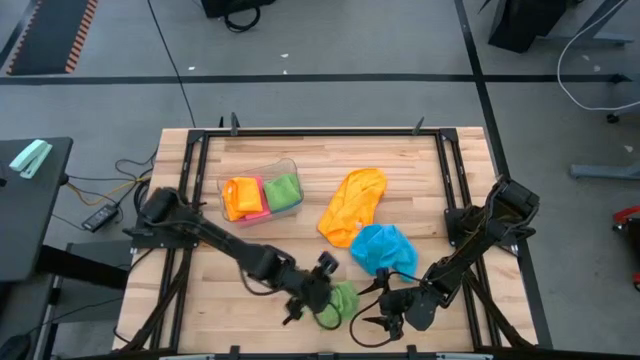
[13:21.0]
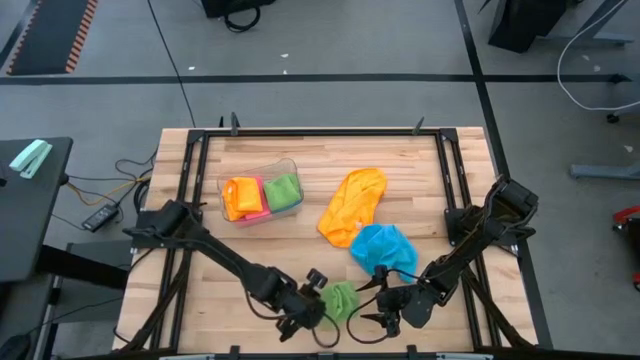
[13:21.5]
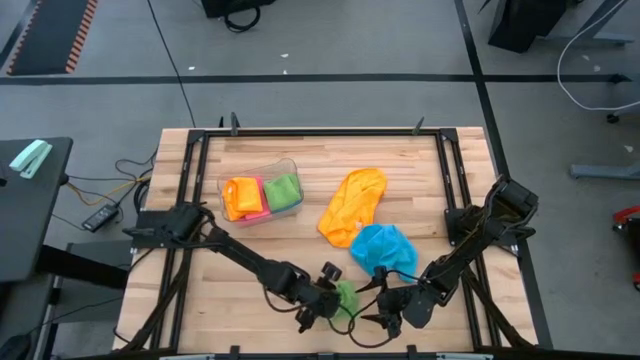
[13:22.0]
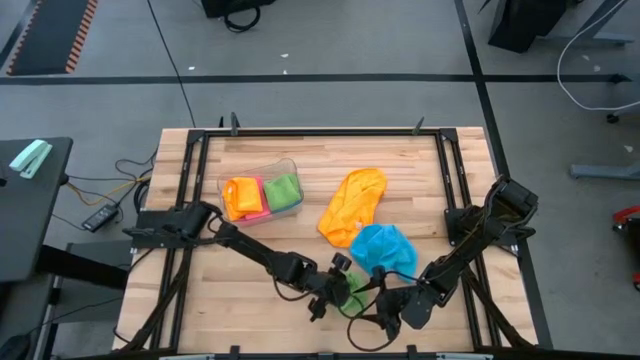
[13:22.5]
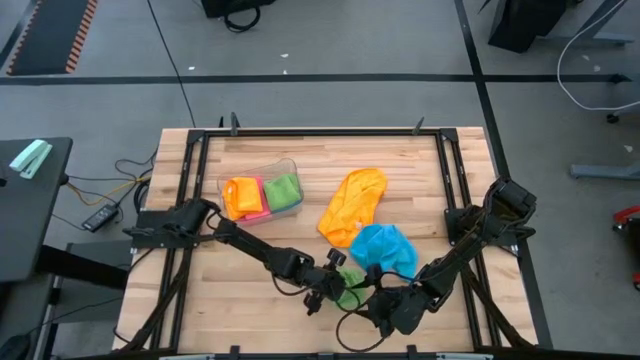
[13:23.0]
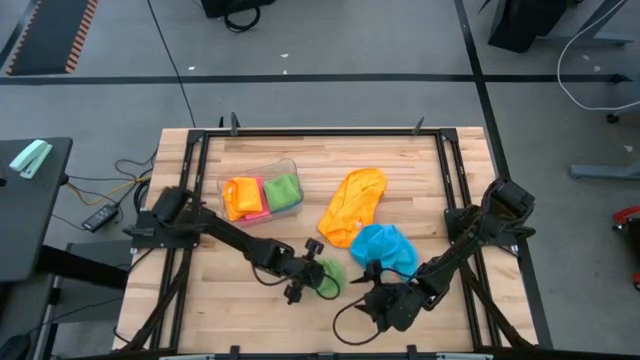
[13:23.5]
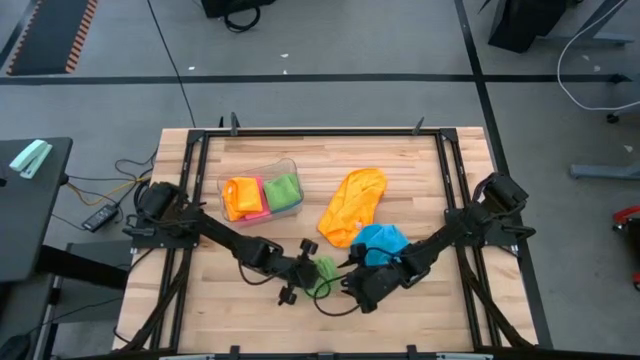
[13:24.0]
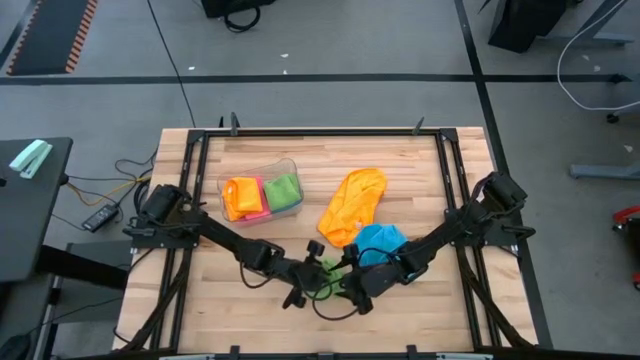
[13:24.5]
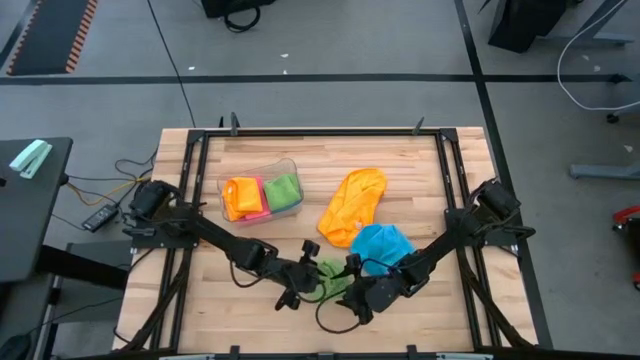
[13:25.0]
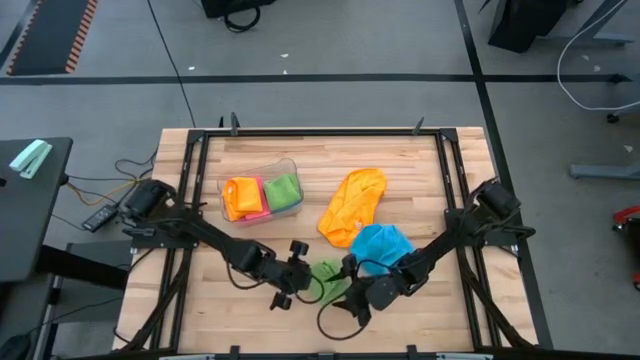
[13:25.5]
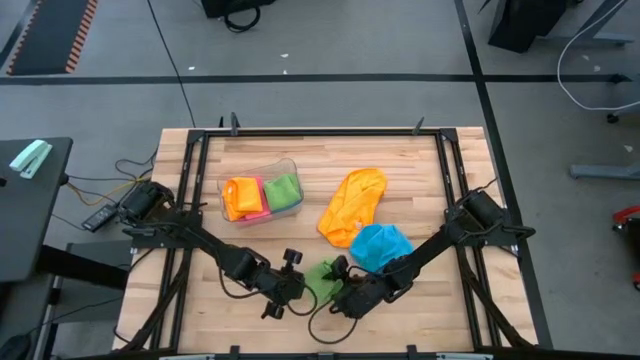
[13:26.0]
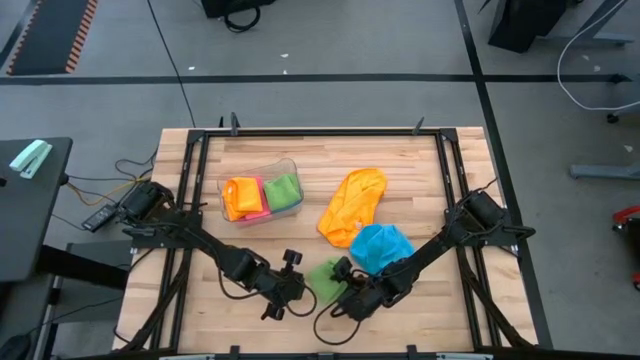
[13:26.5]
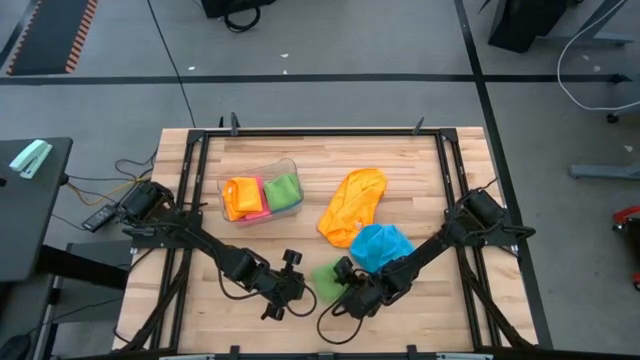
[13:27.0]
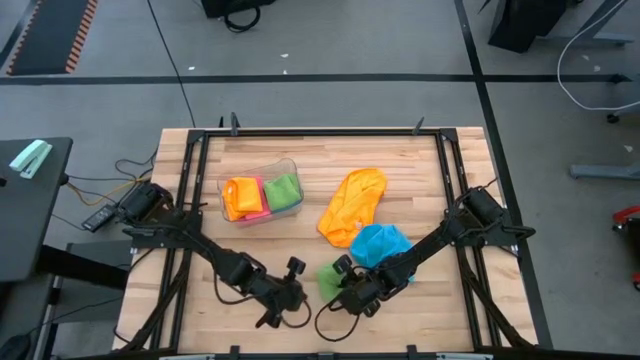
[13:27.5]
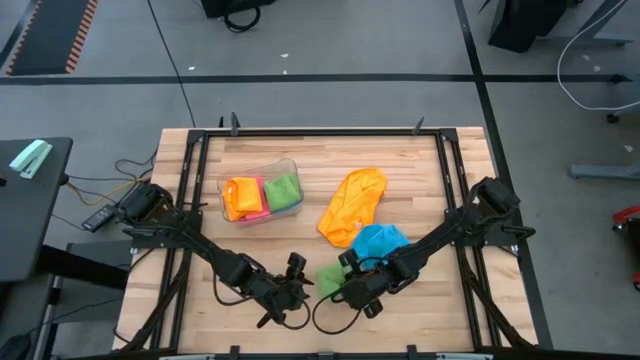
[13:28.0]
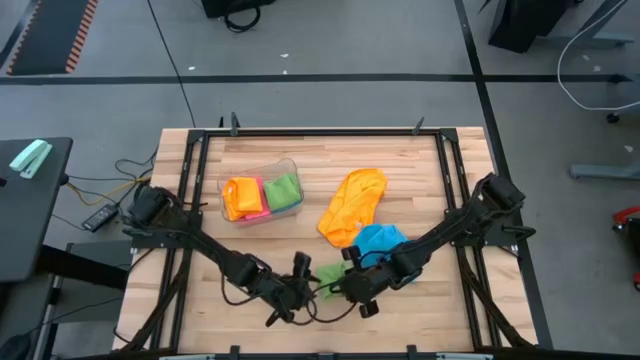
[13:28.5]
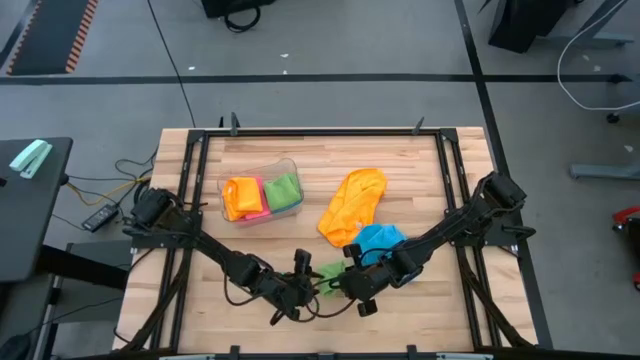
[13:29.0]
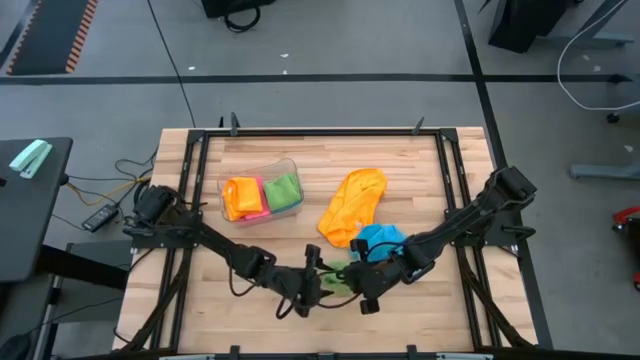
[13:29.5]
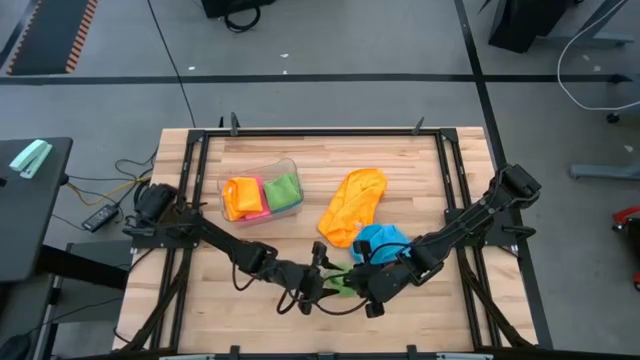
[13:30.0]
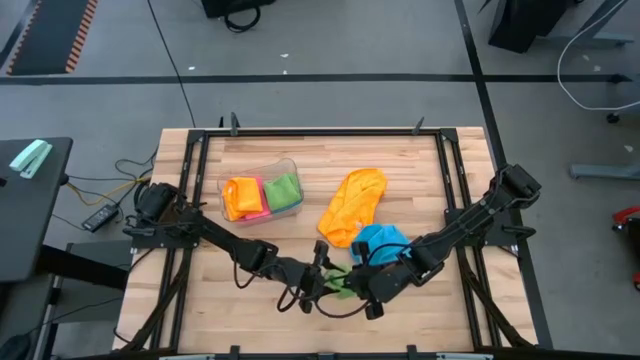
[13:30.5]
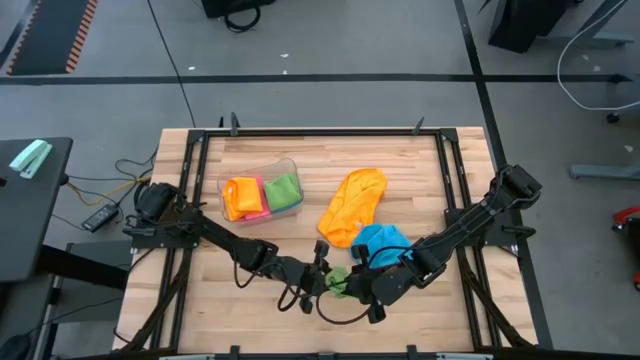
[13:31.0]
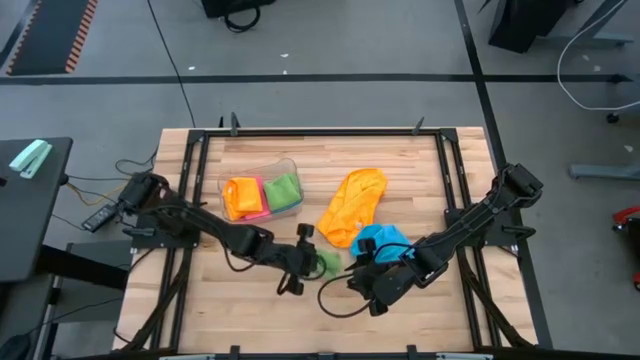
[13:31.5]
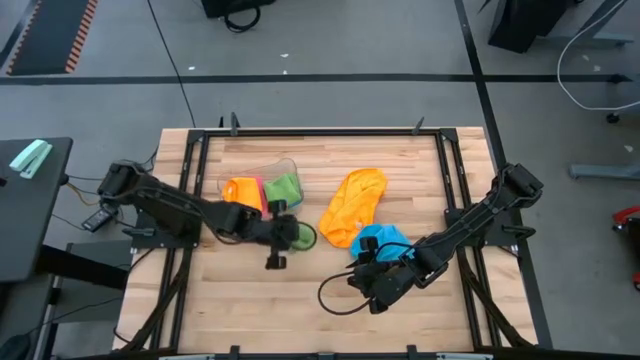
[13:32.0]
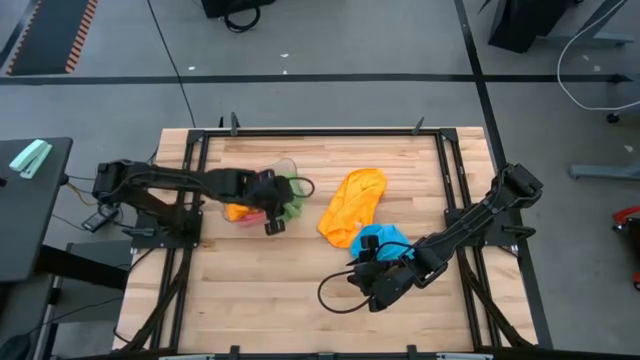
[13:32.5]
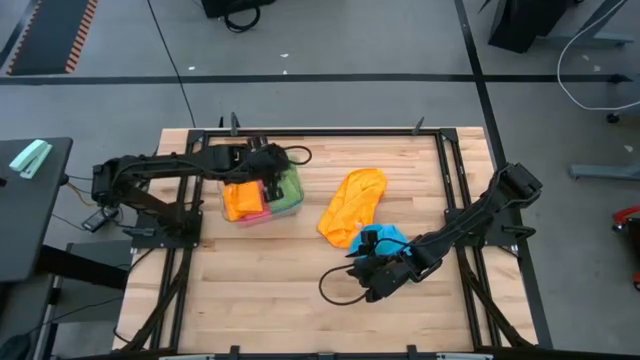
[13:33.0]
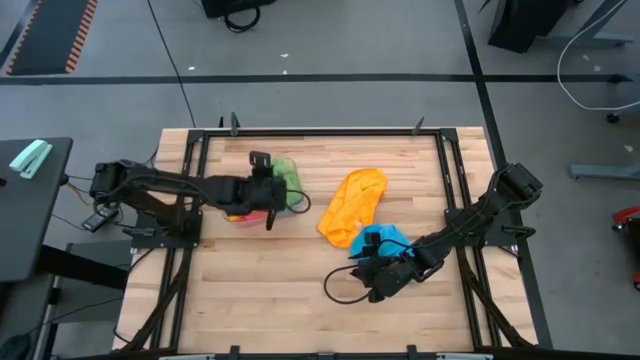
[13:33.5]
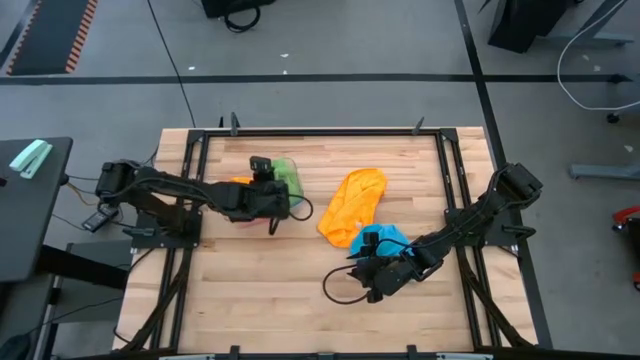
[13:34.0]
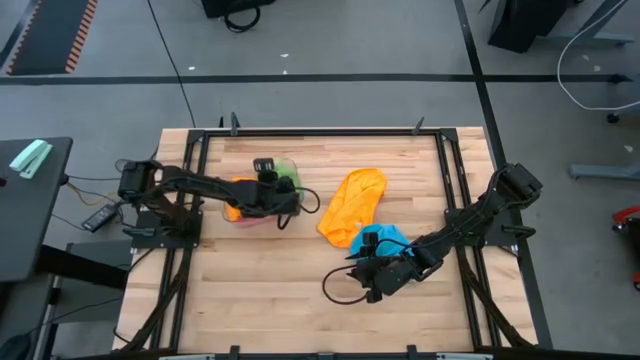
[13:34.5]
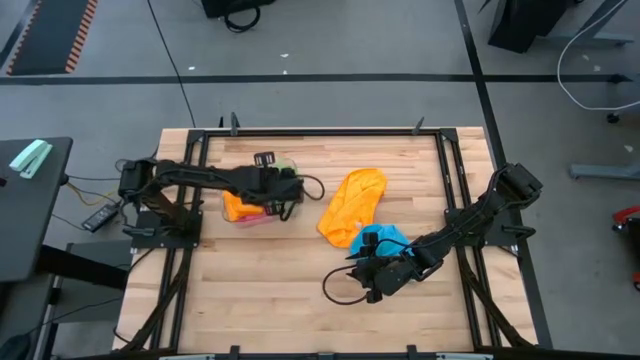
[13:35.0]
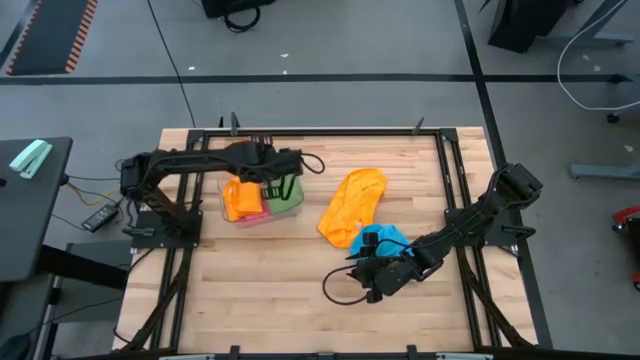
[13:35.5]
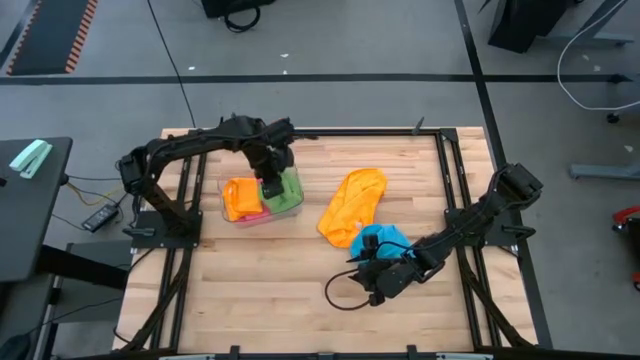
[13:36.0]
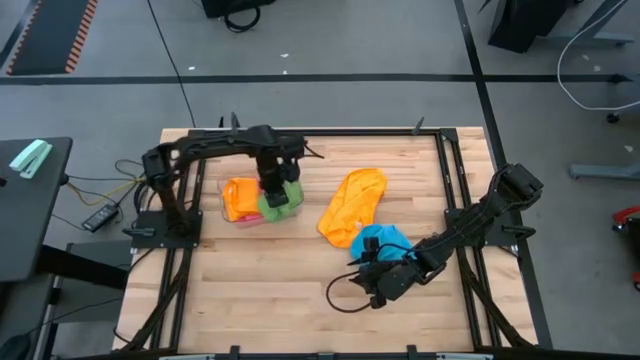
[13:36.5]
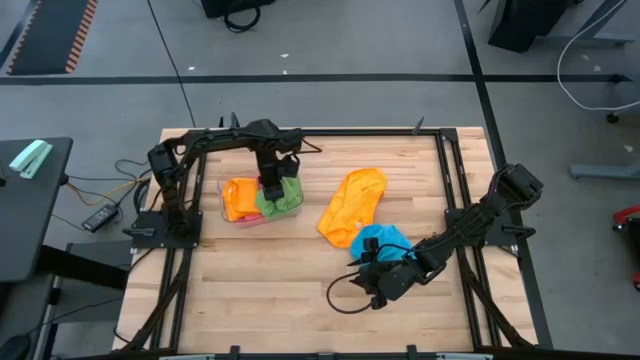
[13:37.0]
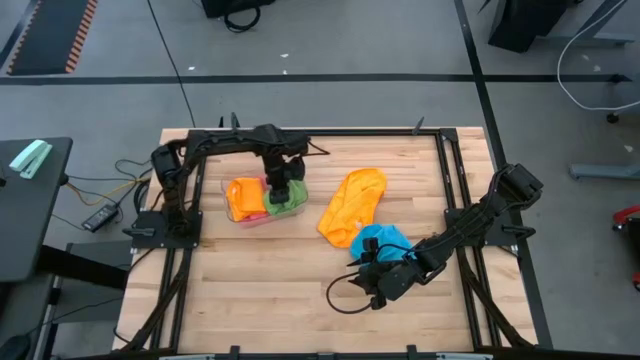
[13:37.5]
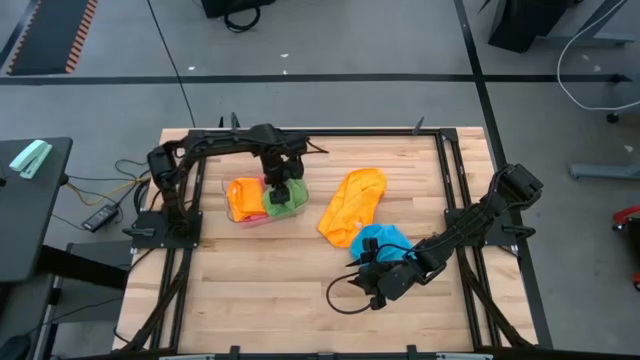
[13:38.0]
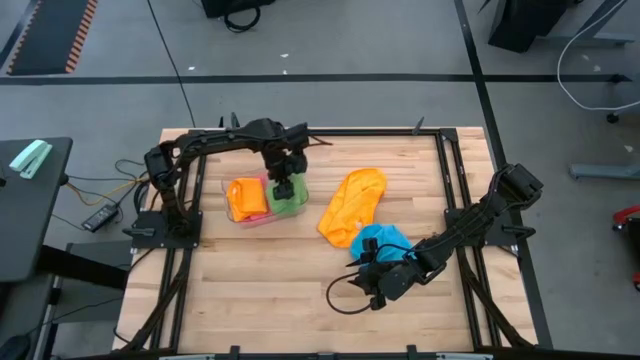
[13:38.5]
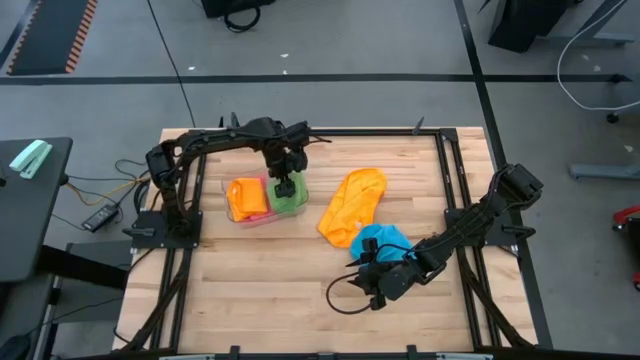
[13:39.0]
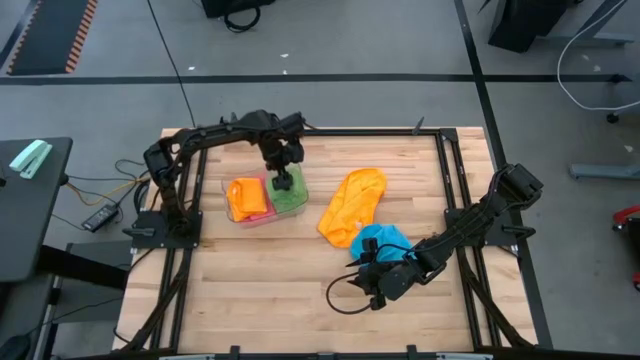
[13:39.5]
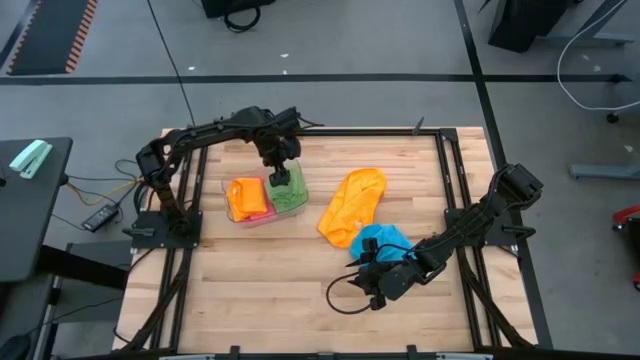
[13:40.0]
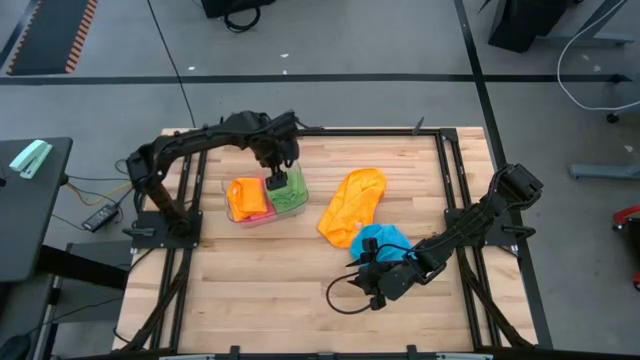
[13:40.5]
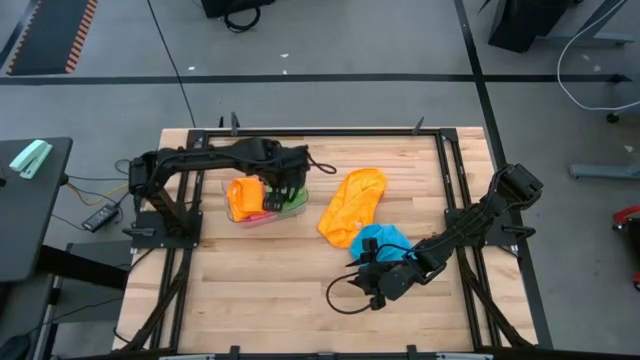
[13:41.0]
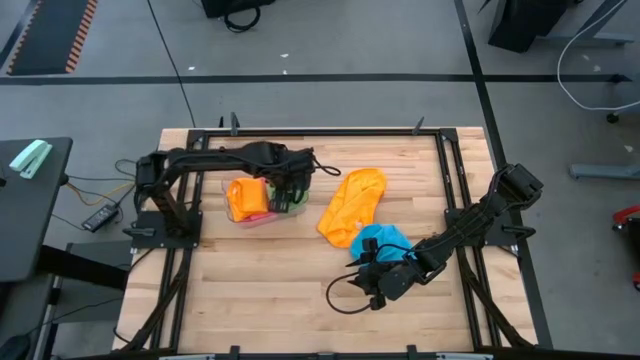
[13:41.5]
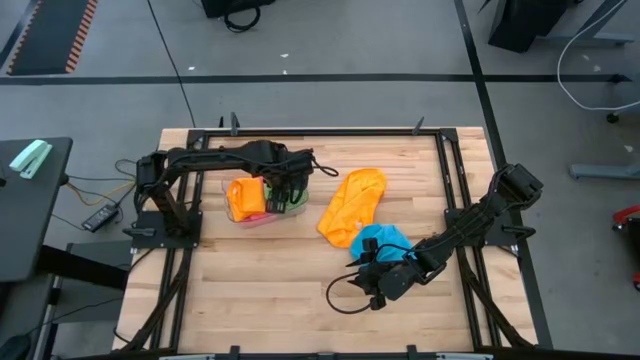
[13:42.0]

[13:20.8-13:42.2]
Task: Fold microfiber towels
Put the green microfiber towel into the transparent bin
